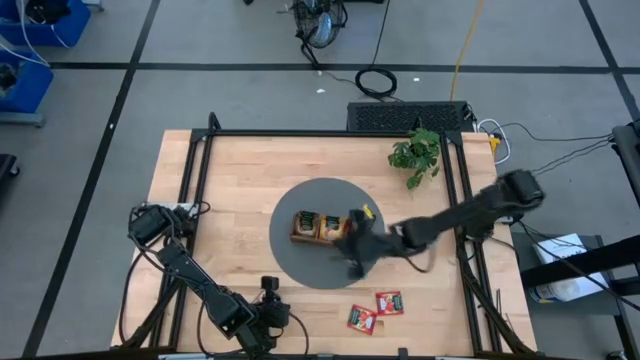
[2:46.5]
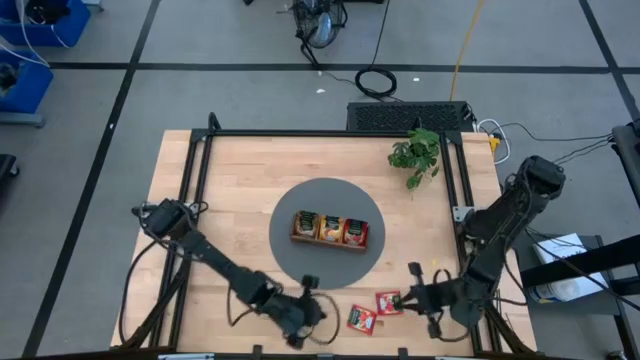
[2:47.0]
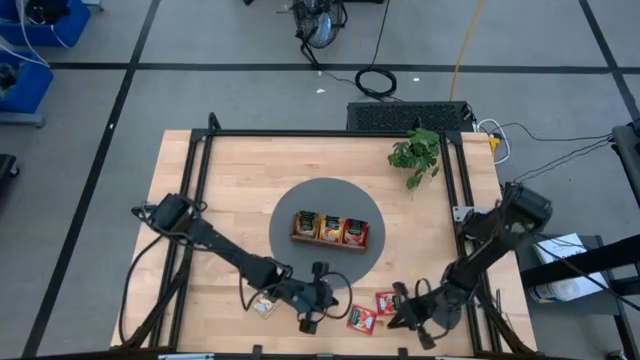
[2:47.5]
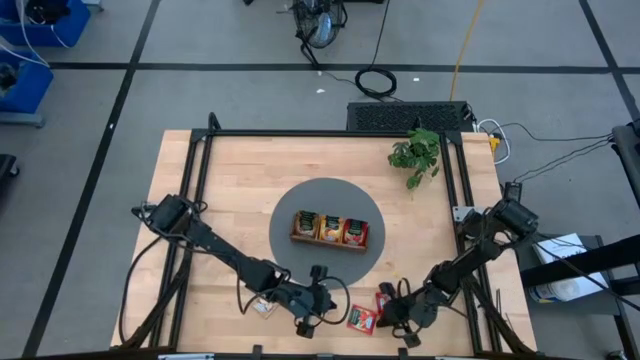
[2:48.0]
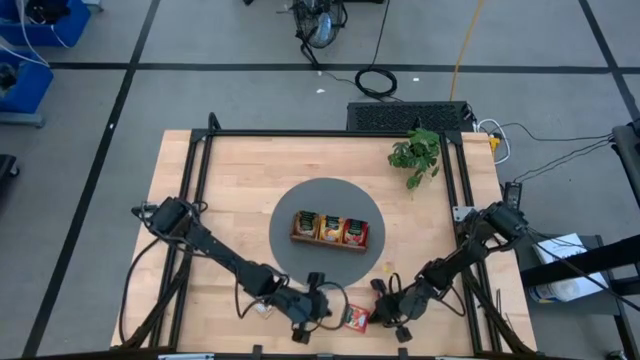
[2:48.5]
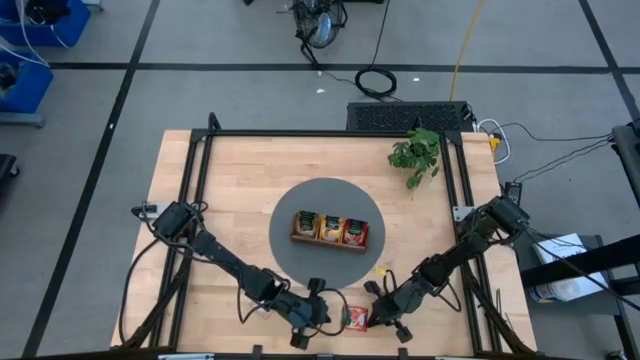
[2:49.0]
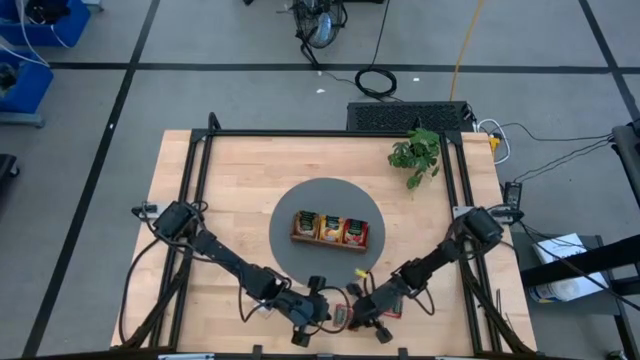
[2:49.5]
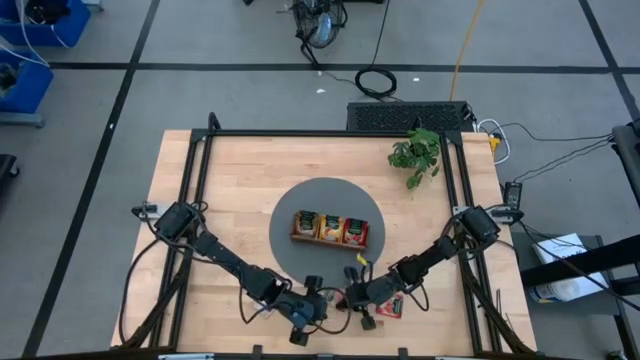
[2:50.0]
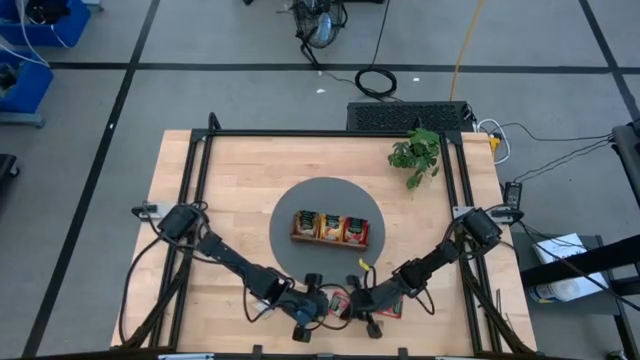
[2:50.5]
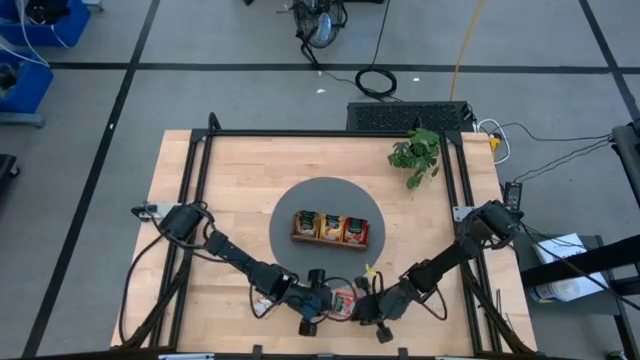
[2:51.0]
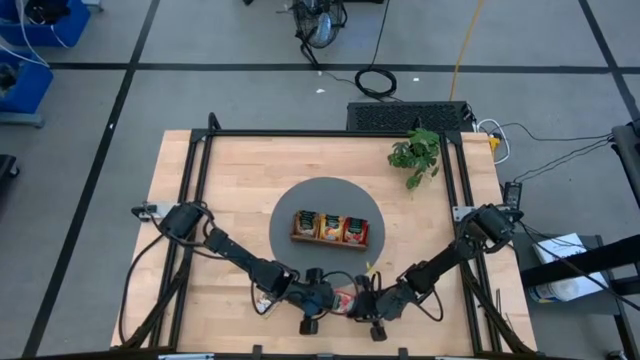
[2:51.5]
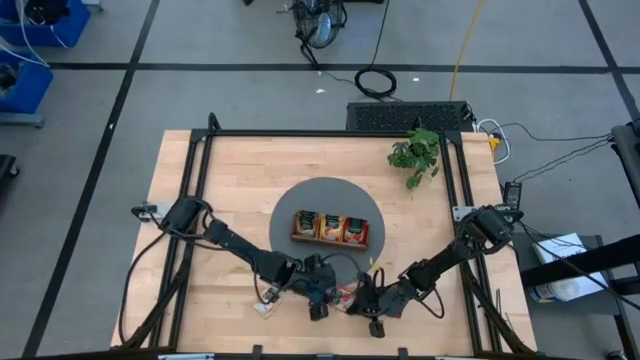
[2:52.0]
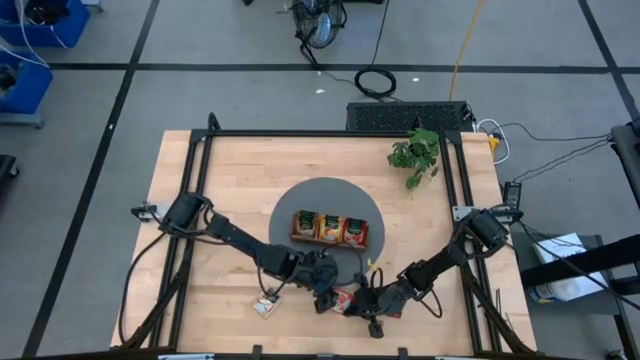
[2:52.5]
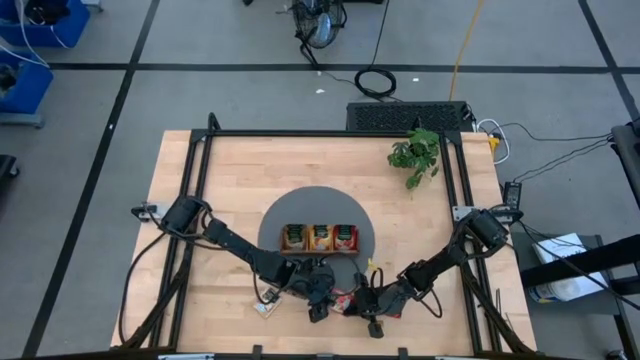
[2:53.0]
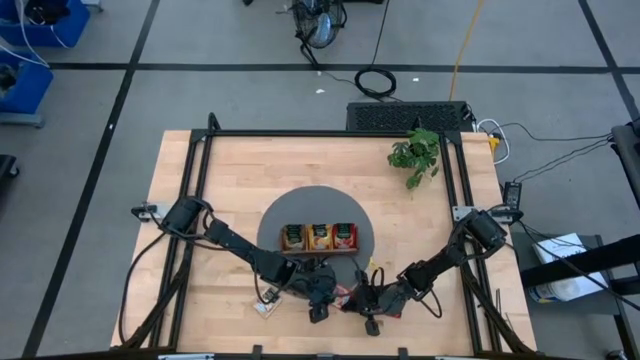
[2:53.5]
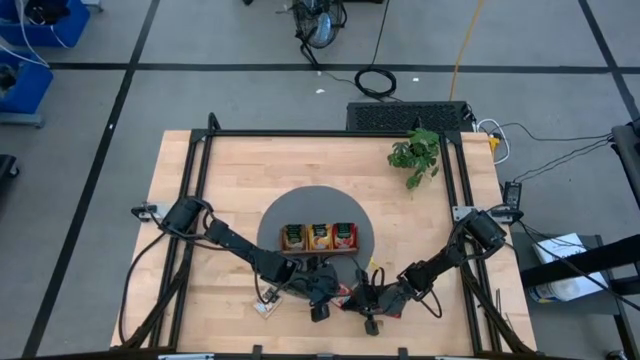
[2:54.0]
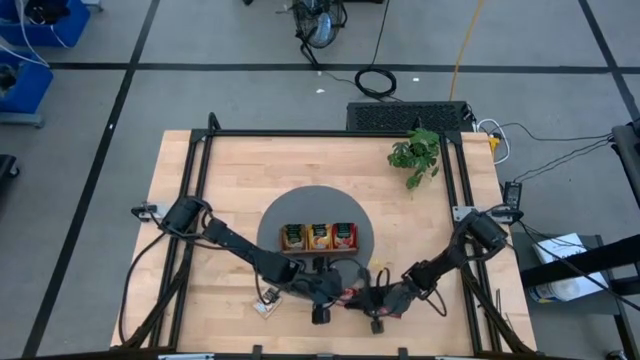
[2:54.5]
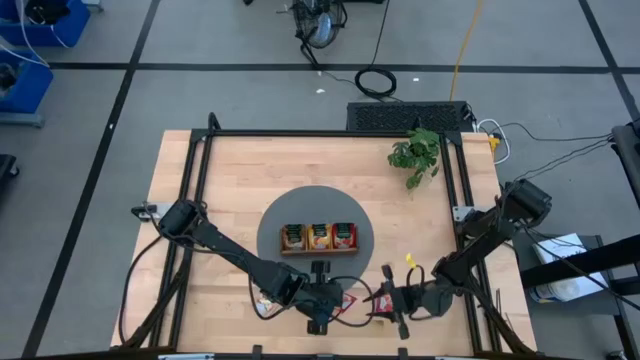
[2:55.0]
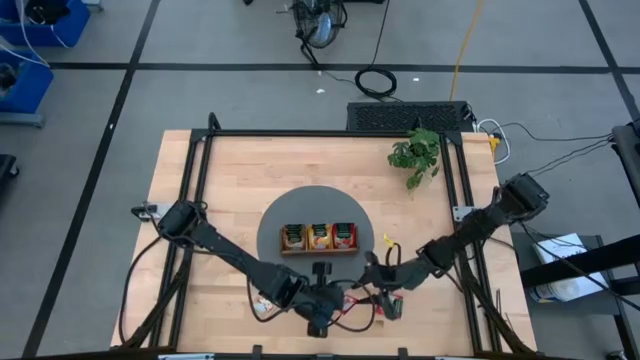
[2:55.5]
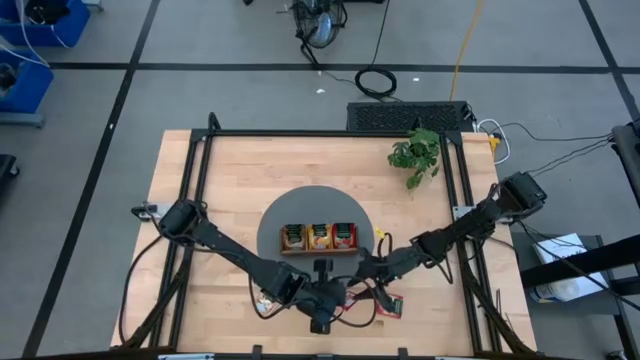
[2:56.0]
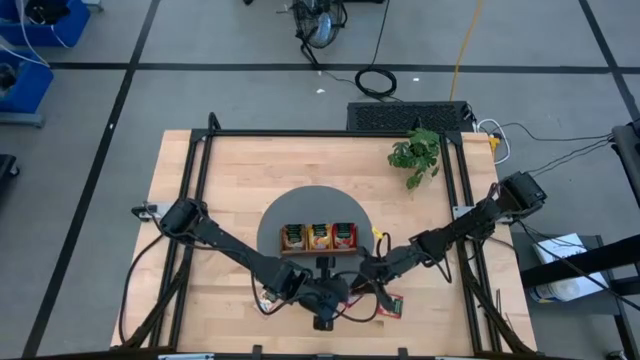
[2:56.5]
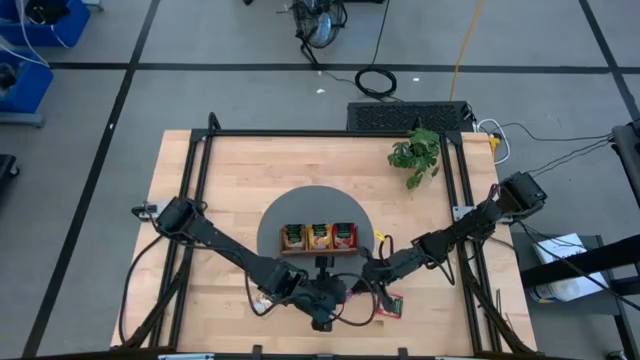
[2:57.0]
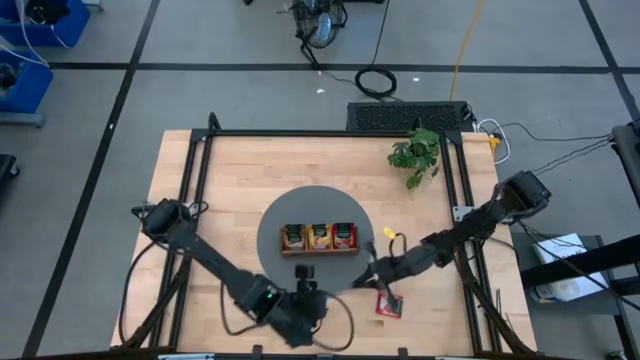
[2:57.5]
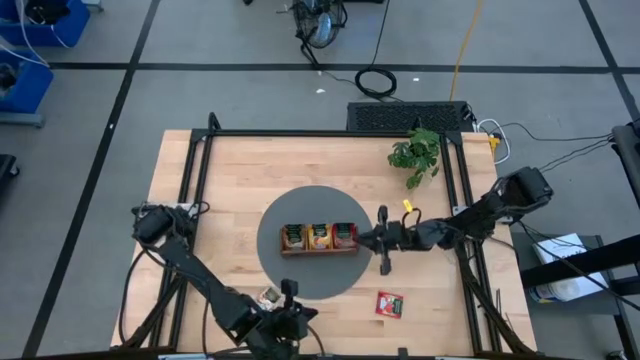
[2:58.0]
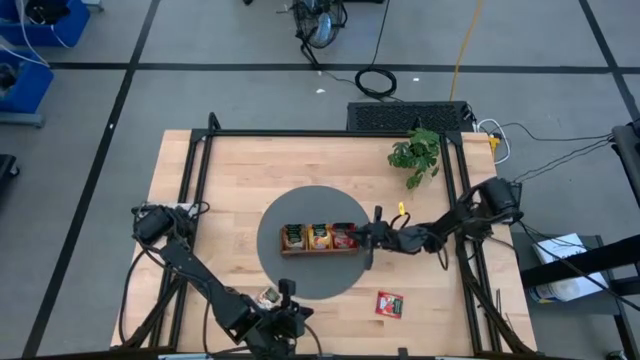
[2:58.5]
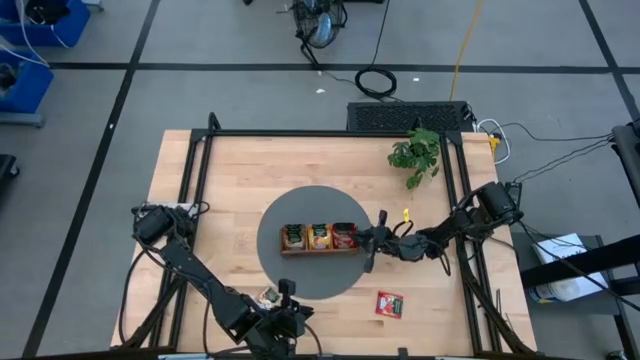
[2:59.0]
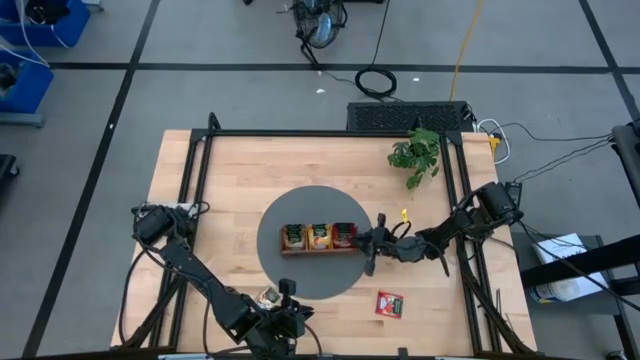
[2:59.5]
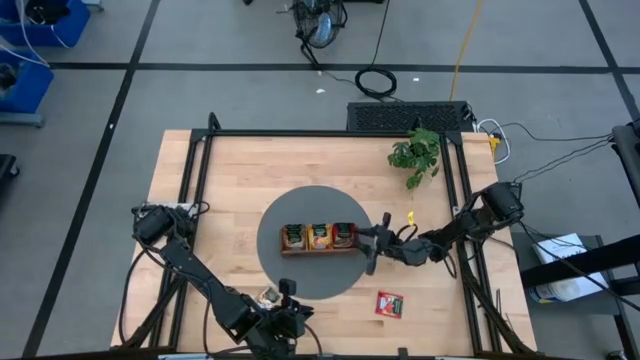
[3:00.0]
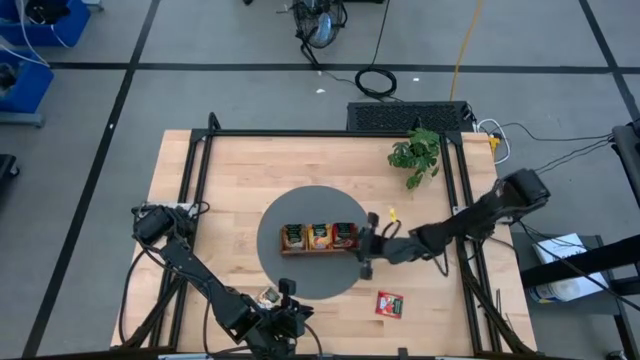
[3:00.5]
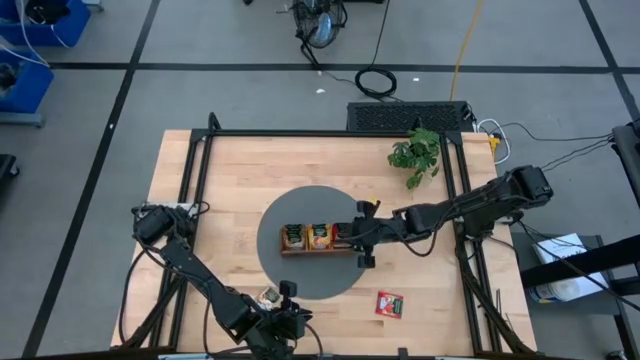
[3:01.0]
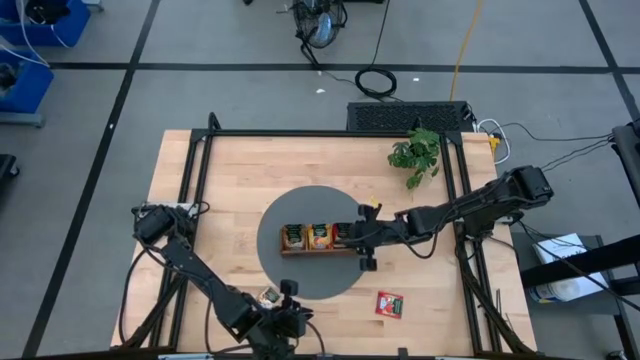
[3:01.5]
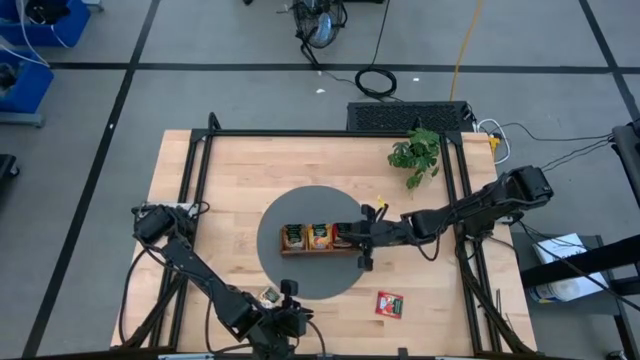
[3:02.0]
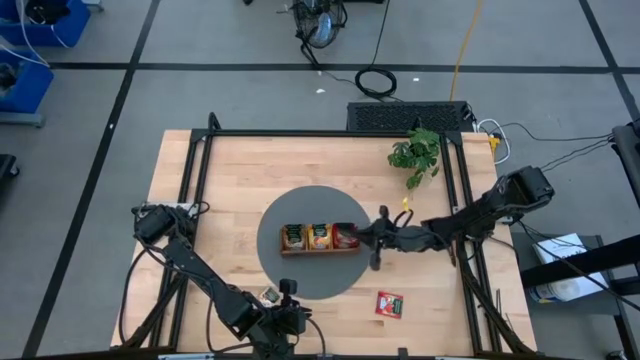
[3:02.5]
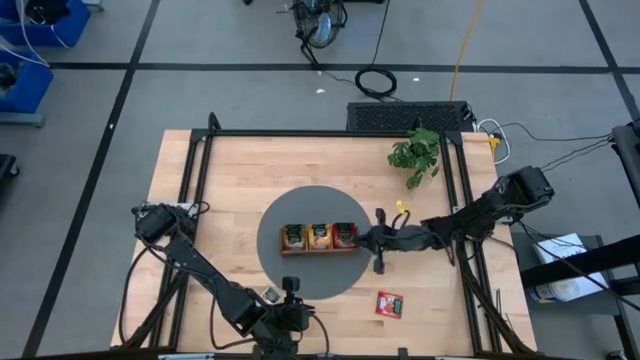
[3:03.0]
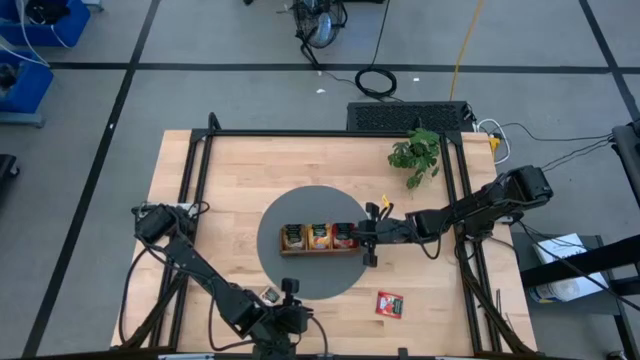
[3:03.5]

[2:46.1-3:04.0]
Task: Pick & Place Tea
Put the red tea bag into the right section of the wooden organizer

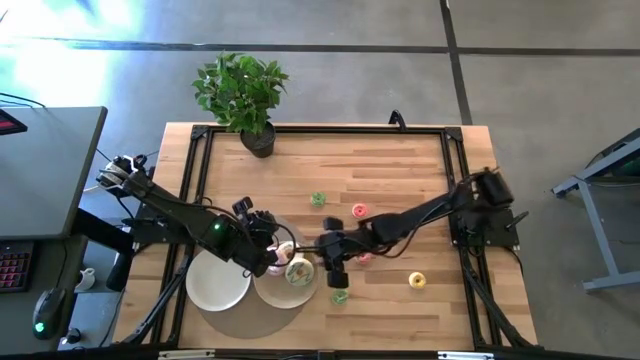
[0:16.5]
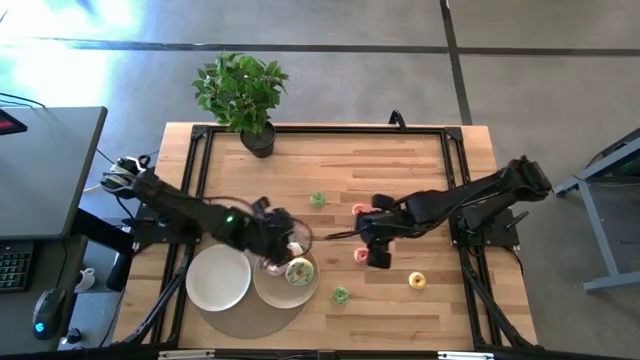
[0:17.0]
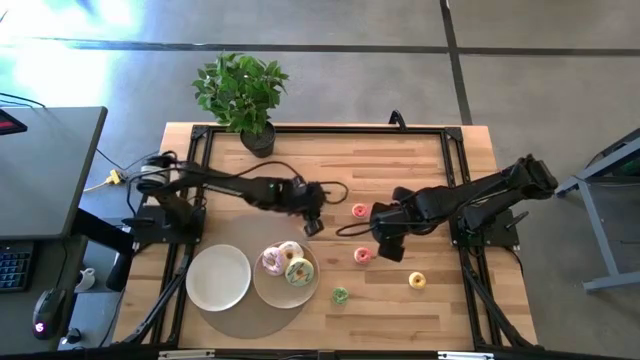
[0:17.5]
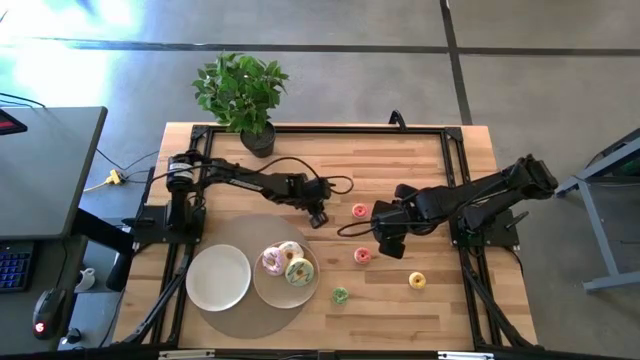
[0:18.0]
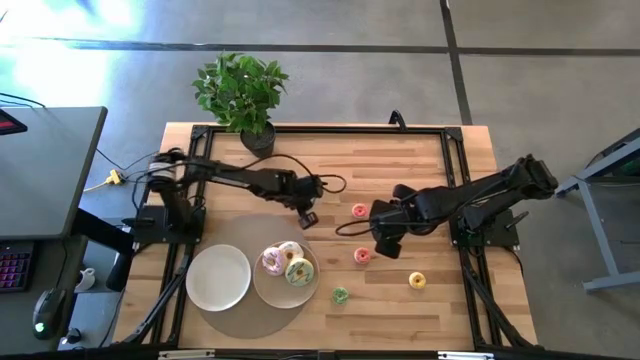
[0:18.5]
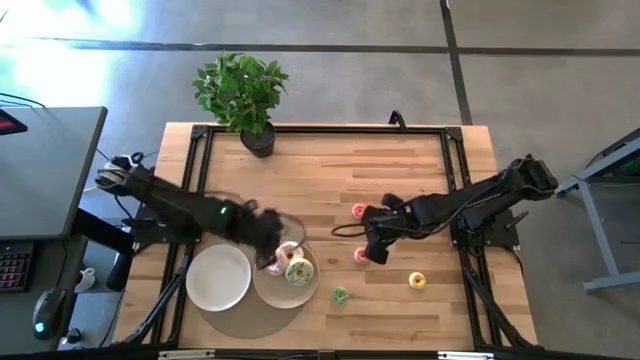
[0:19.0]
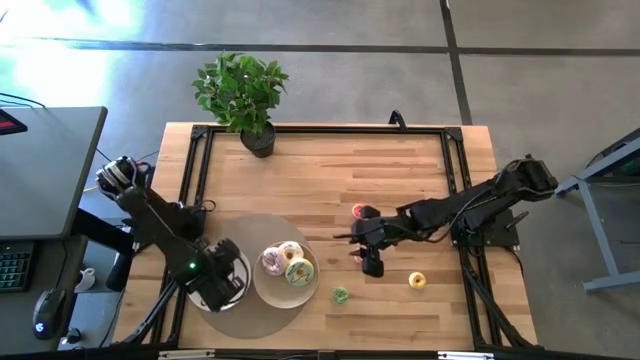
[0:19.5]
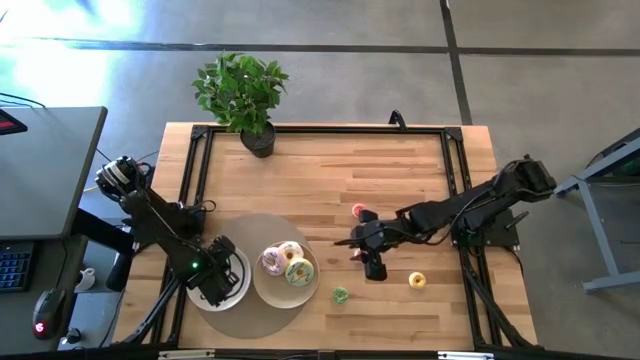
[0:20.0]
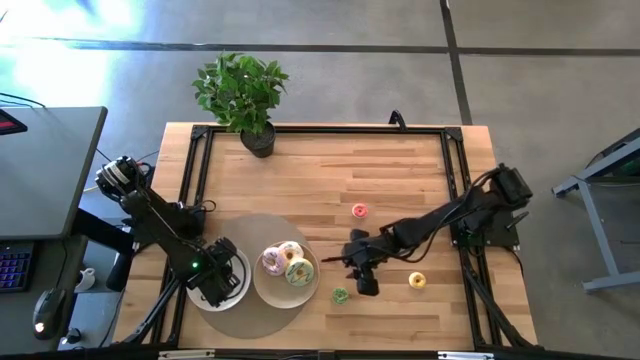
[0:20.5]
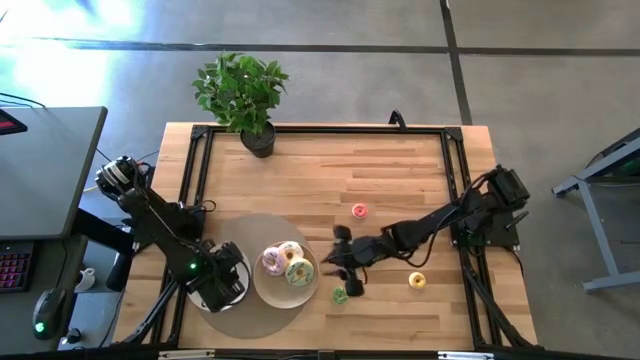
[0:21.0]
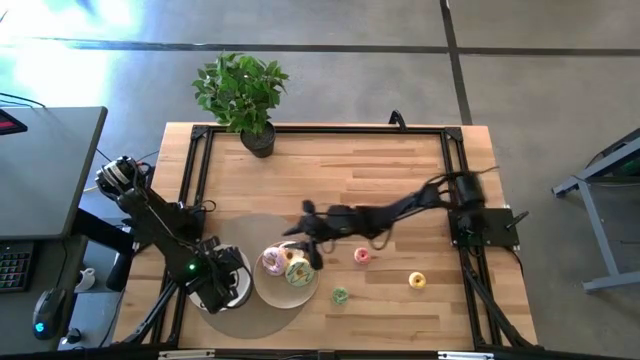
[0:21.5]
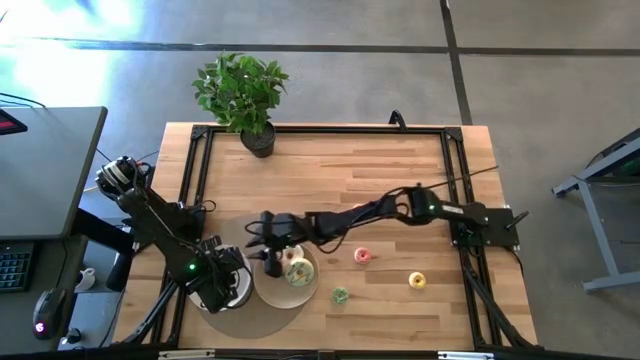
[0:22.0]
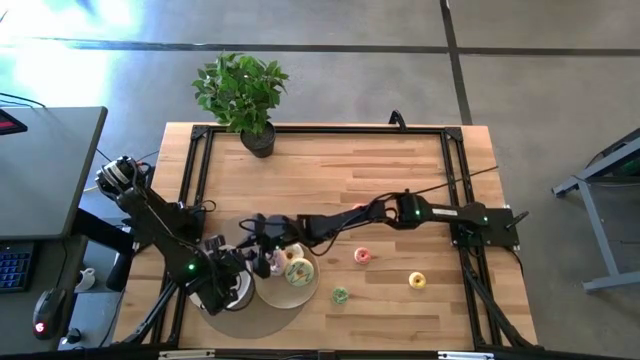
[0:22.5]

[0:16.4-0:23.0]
Task: Pick & Place donuts
Put the top small green donut on the white plate
